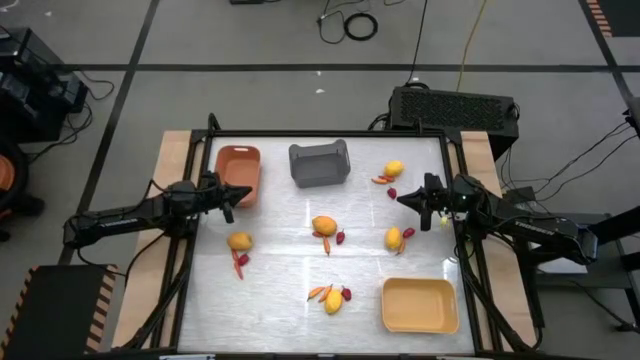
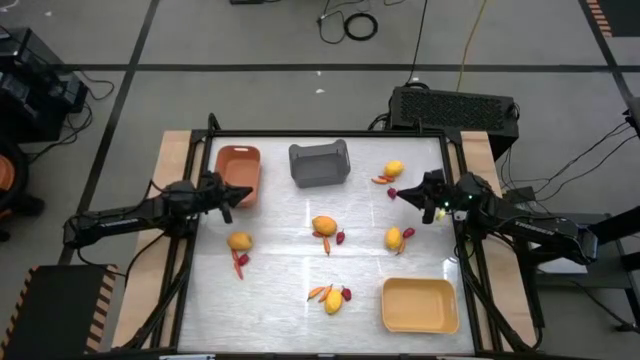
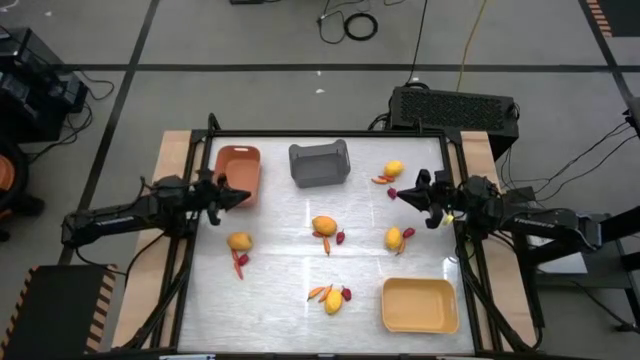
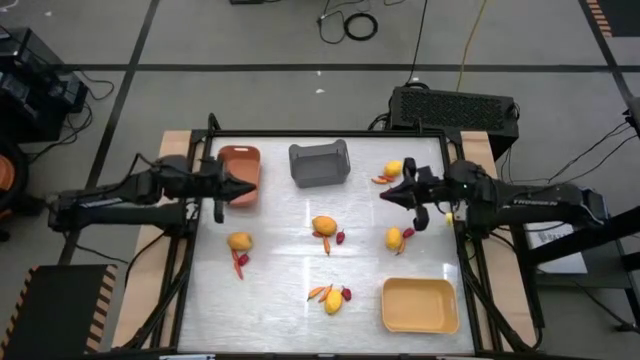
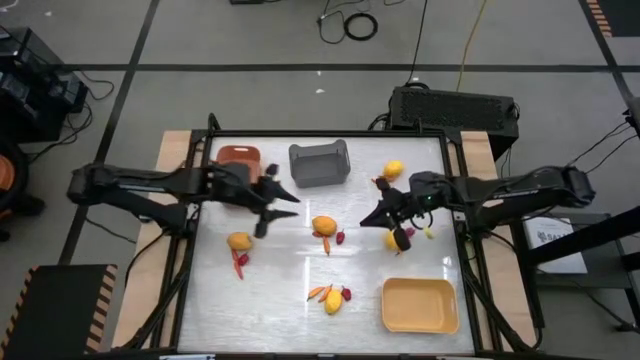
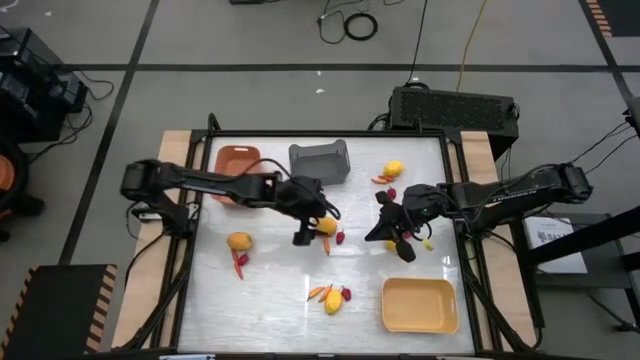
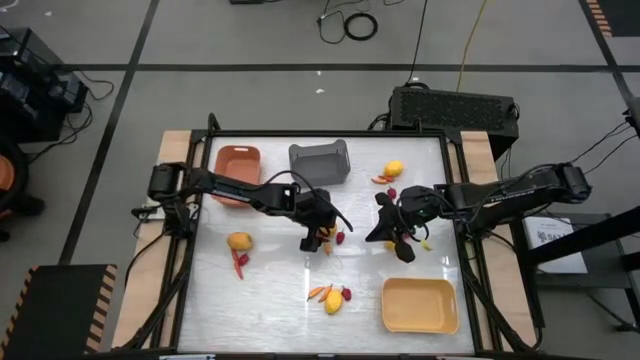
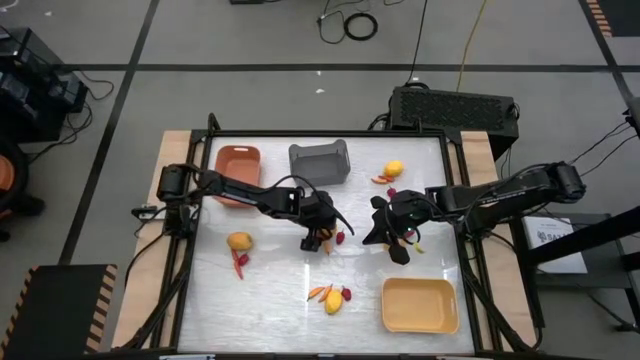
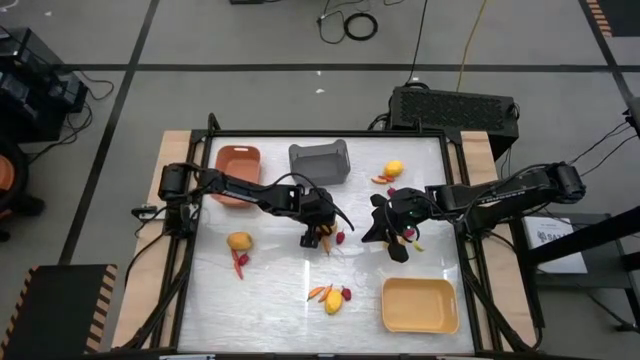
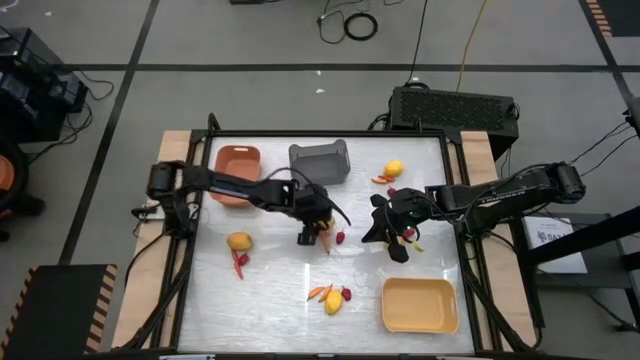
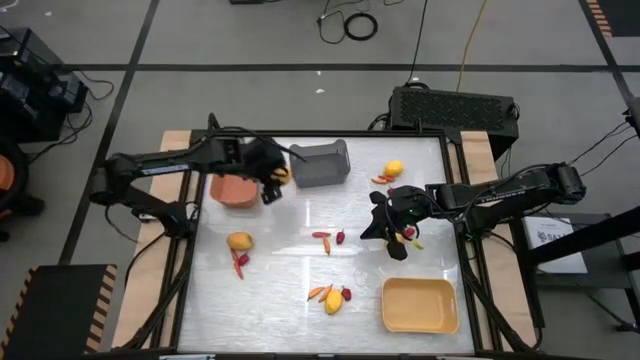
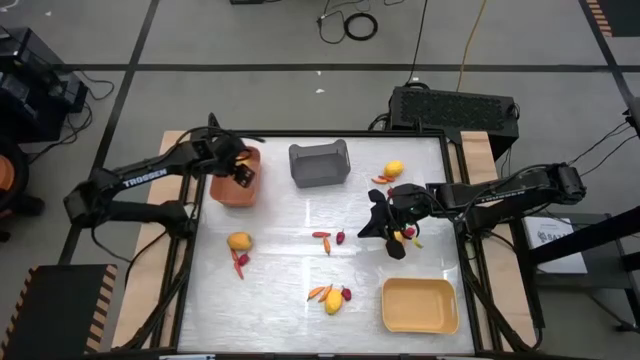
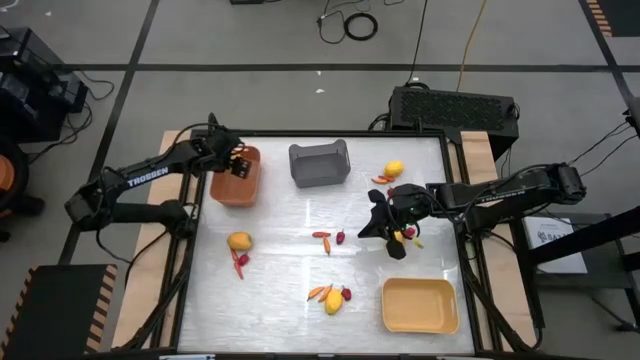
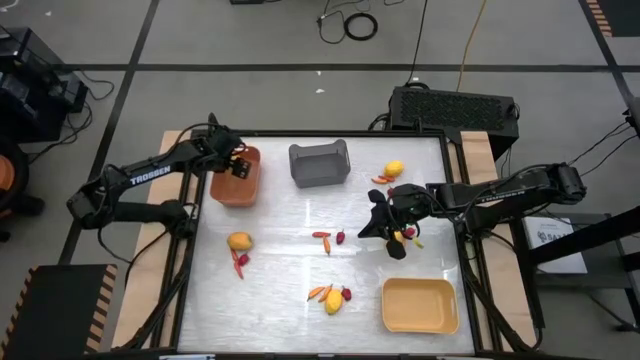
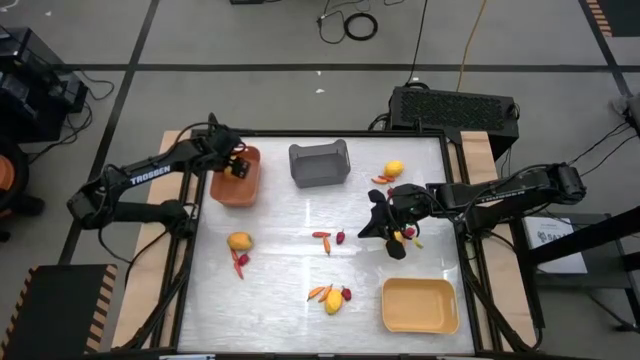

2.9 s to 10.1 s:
Task: Sort produce into baskets
Put the lemon into the orange bin

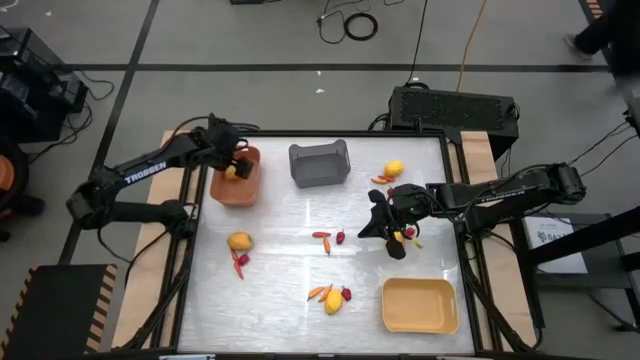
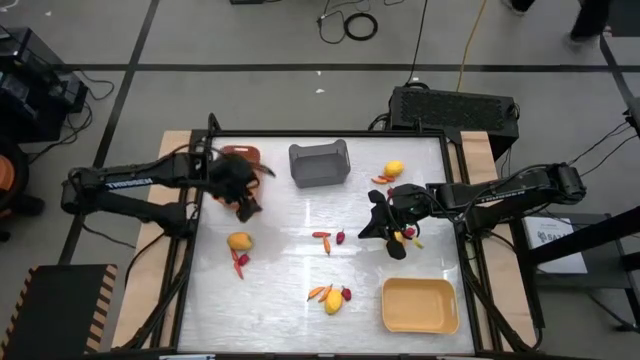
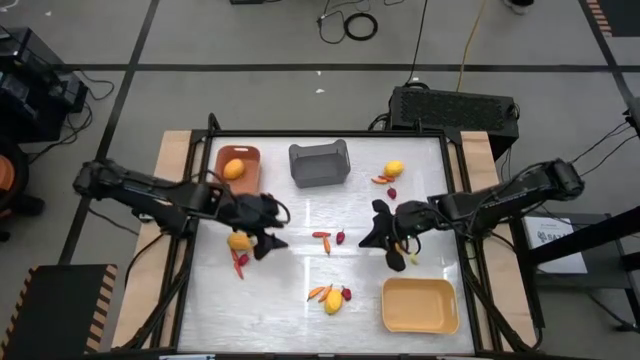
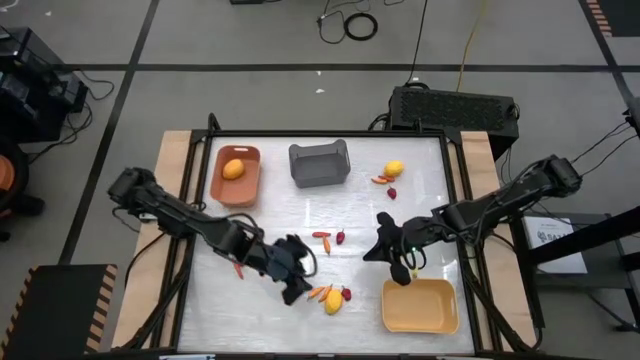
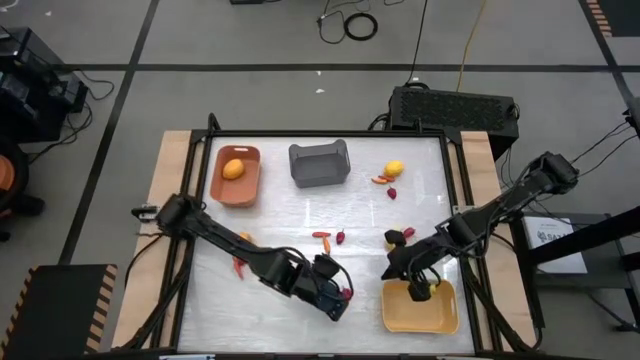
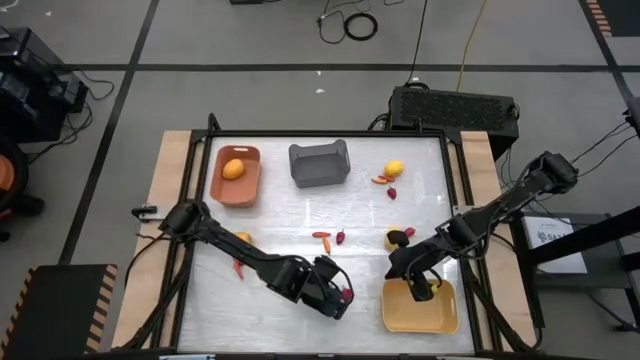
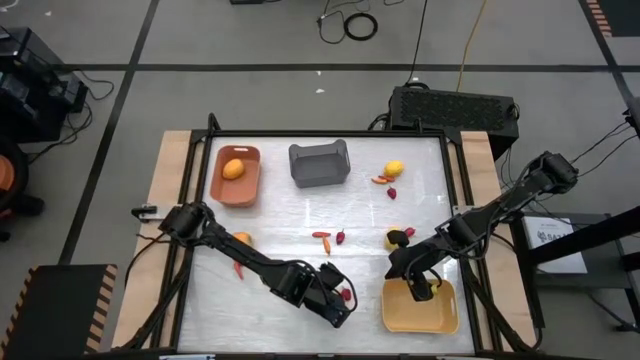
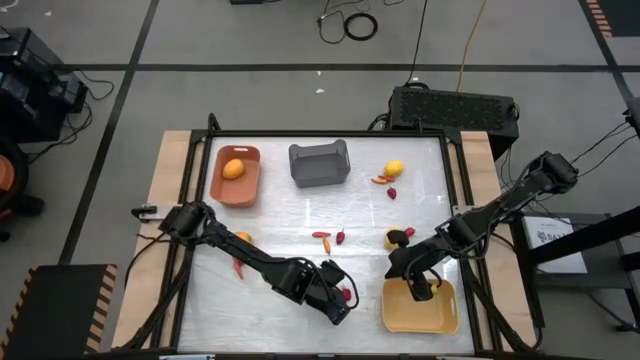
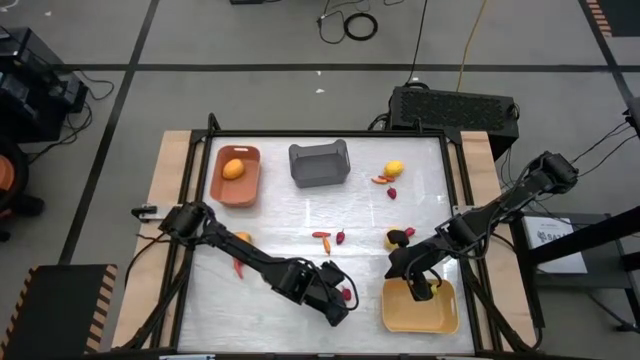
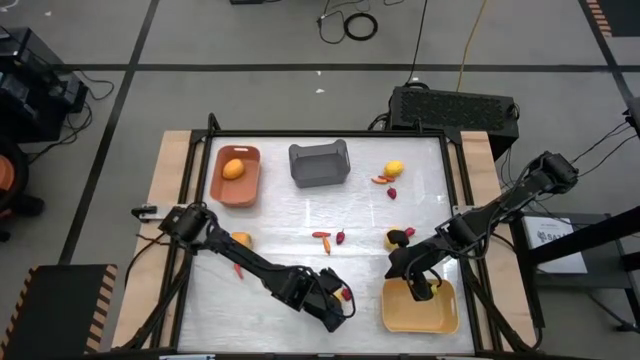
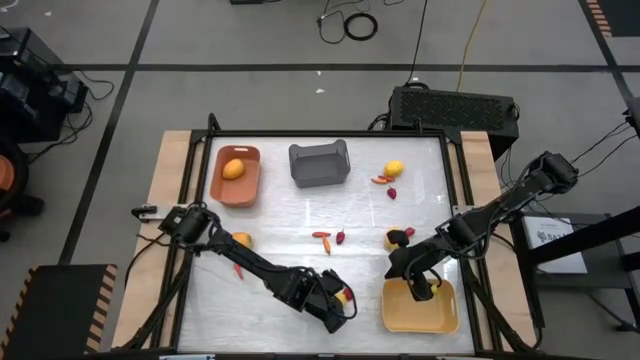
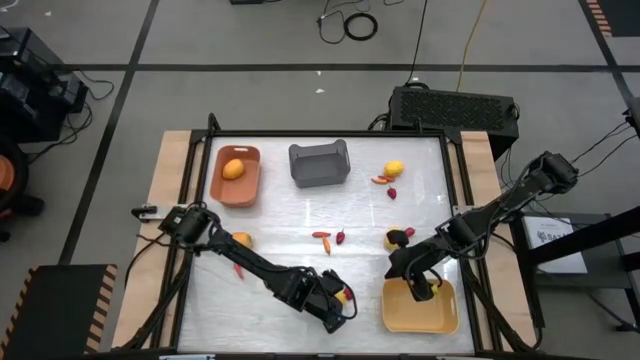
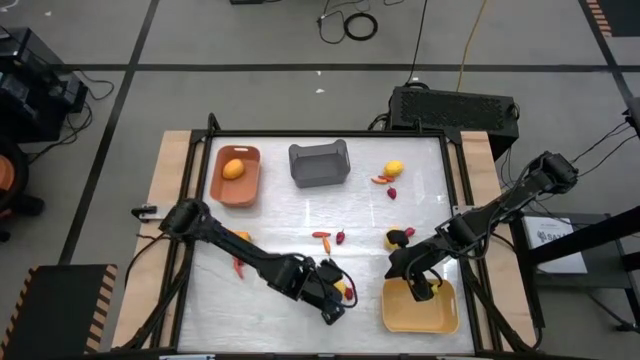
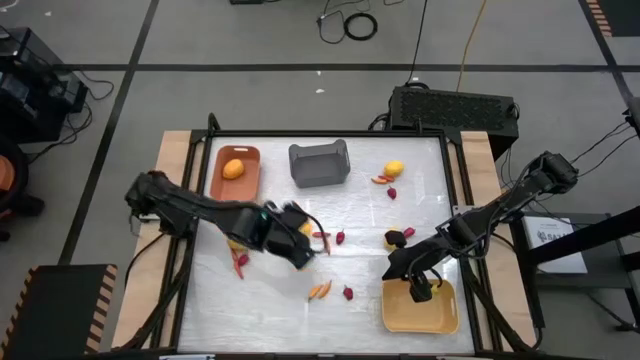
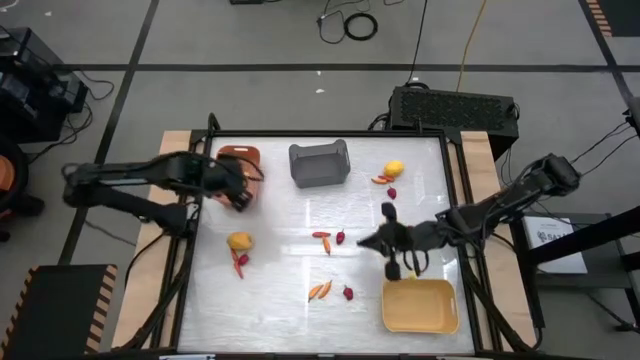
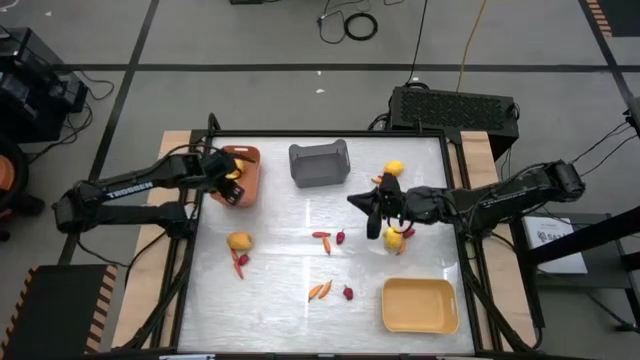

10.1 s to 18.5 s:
Put the lemon into the orange bin

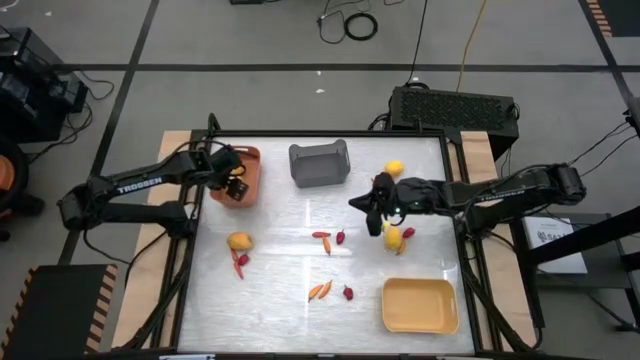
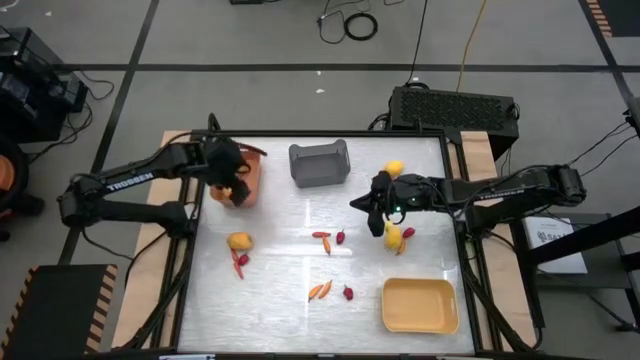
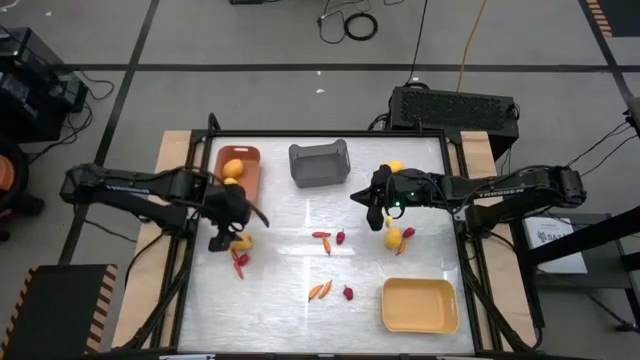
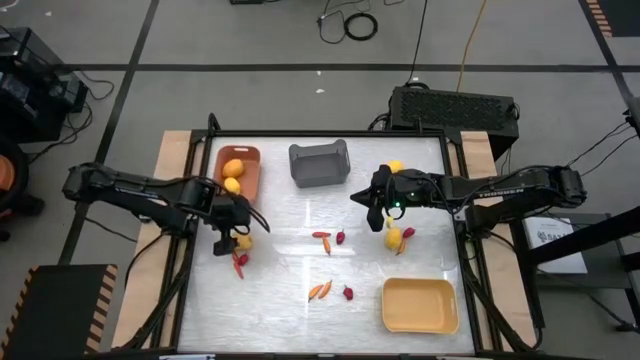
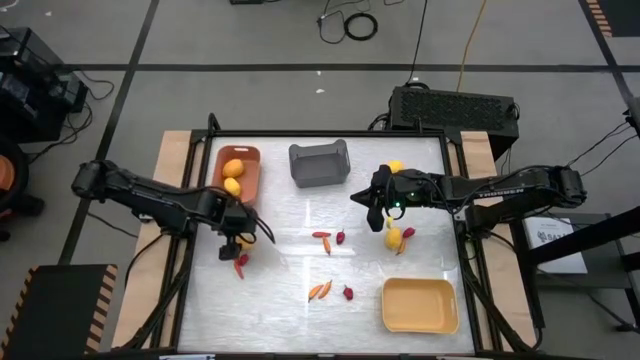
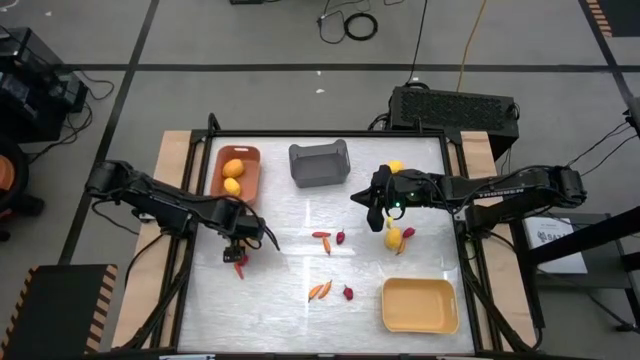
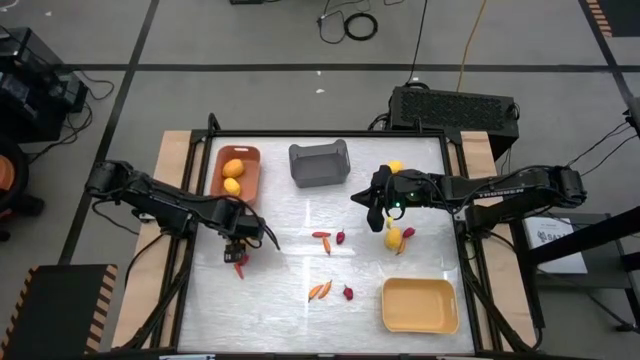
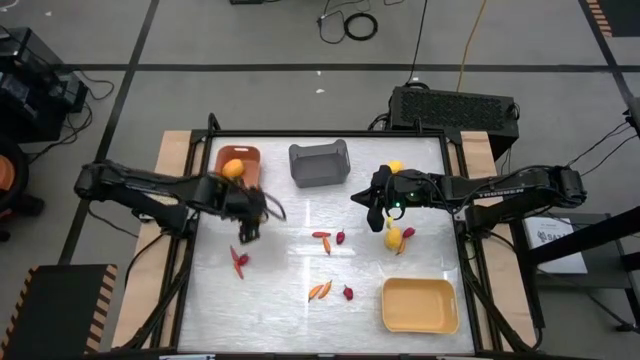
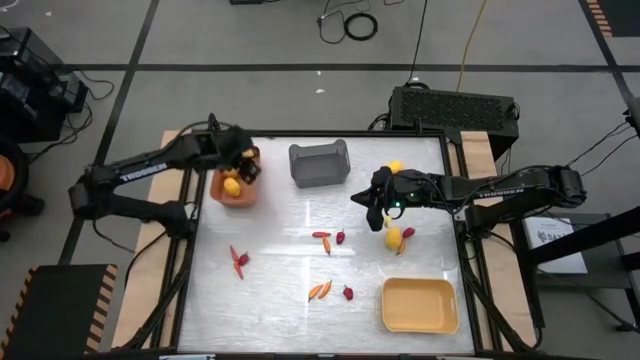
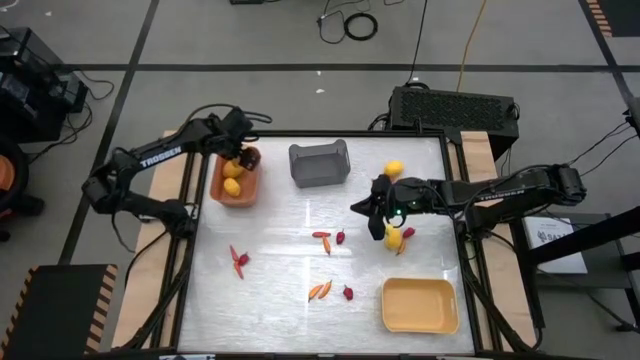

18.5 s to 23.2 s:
Put the lemon into the orange bin
